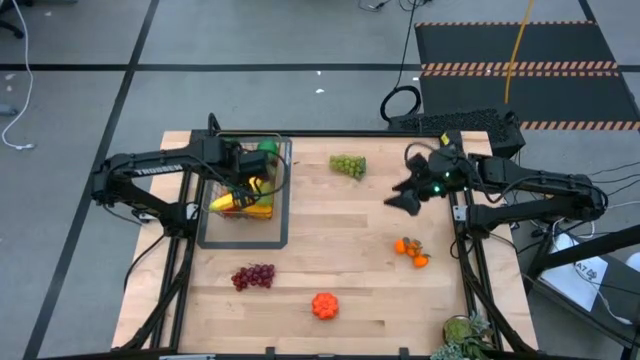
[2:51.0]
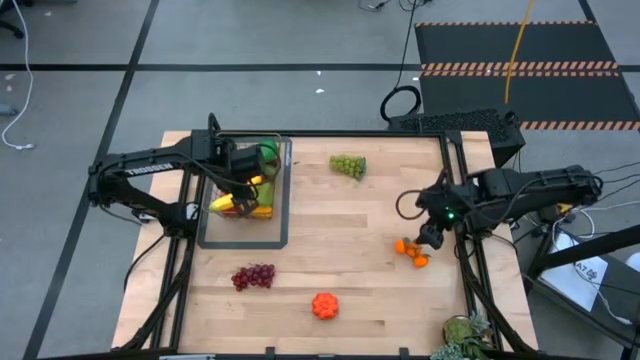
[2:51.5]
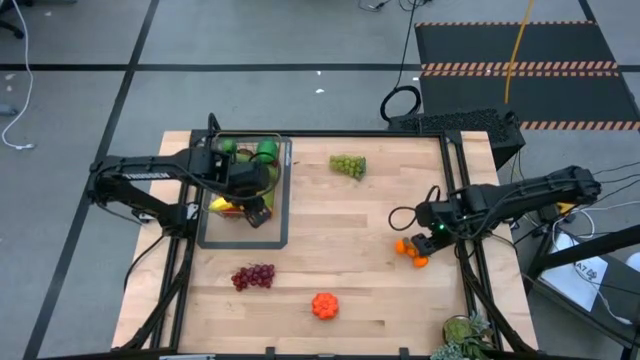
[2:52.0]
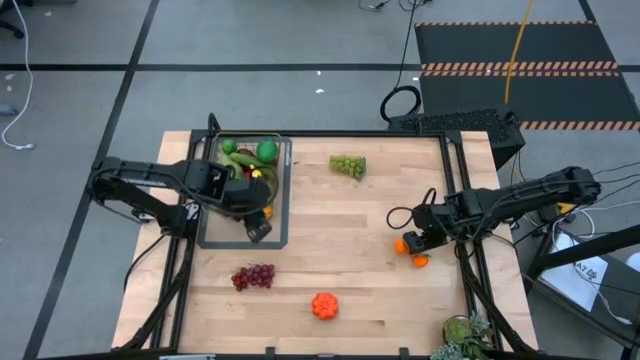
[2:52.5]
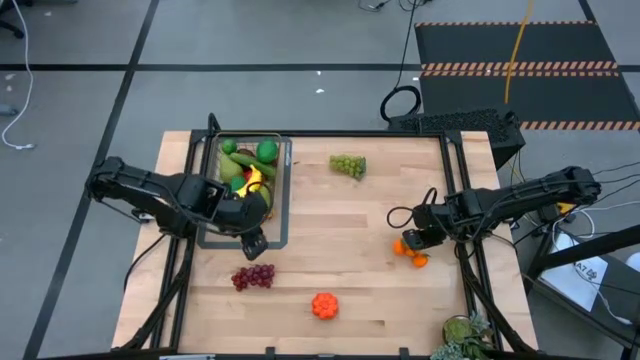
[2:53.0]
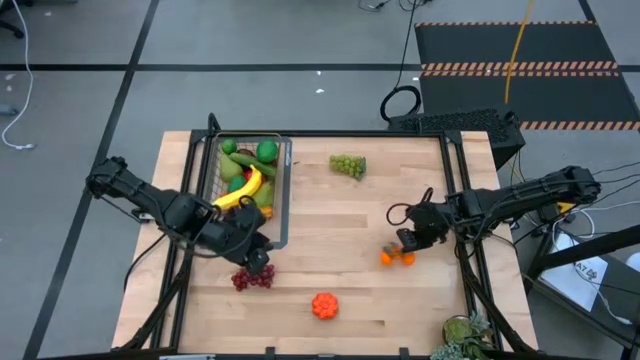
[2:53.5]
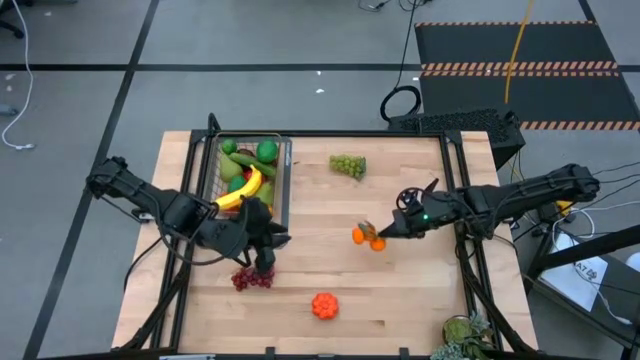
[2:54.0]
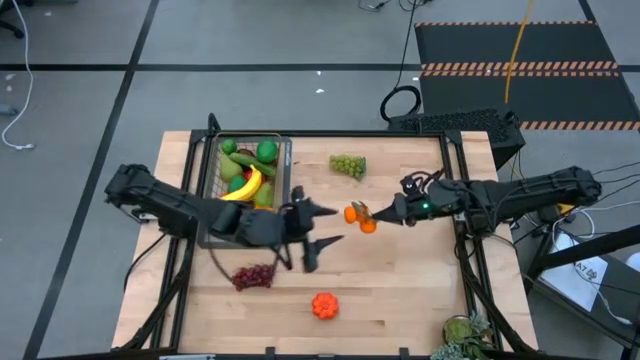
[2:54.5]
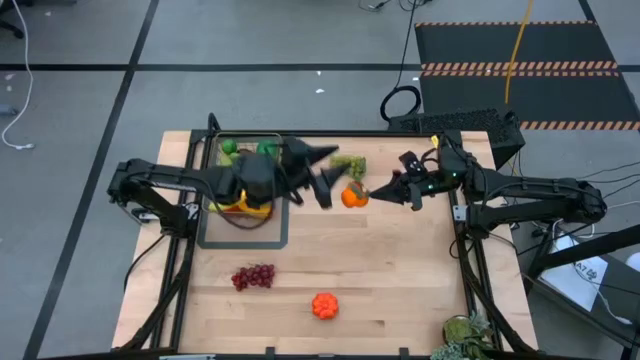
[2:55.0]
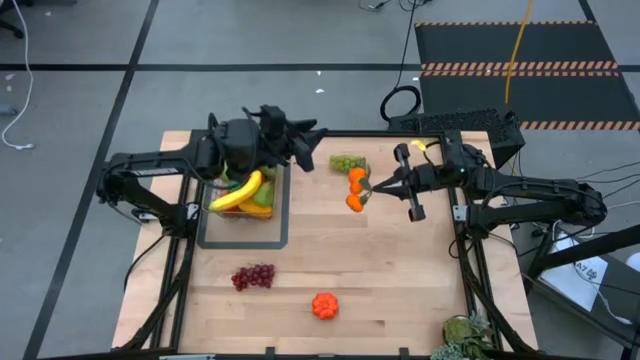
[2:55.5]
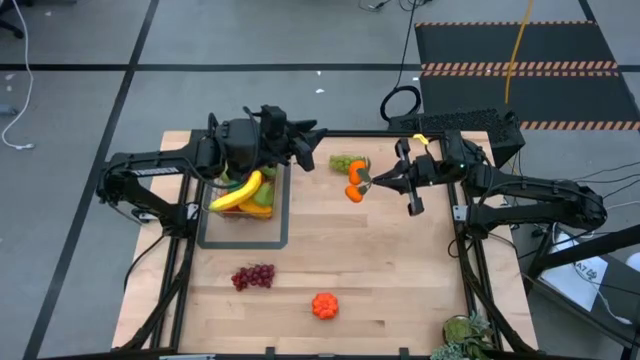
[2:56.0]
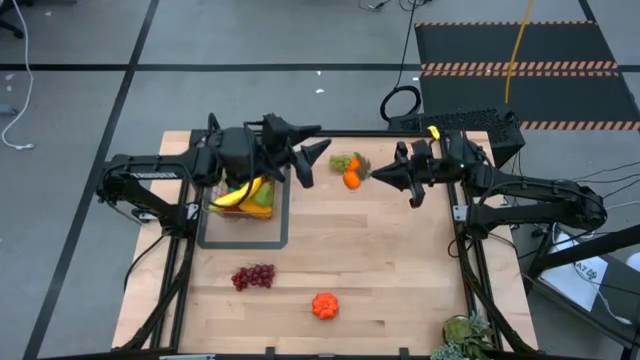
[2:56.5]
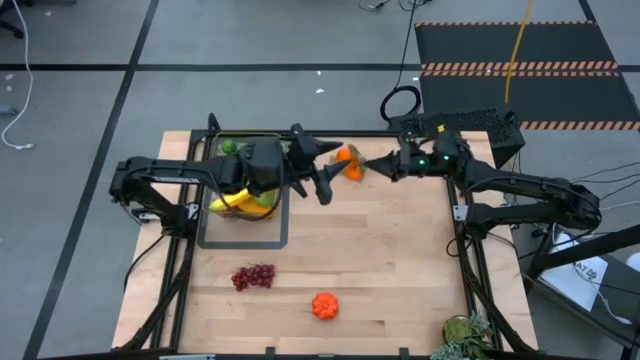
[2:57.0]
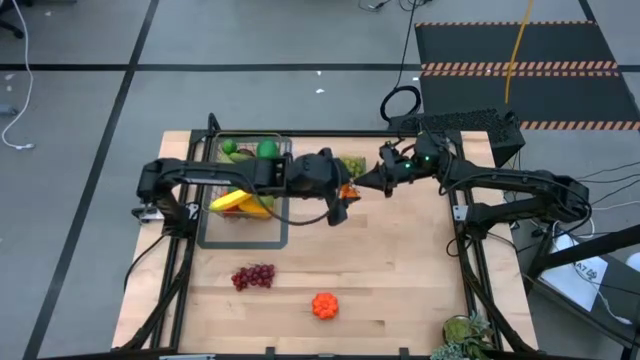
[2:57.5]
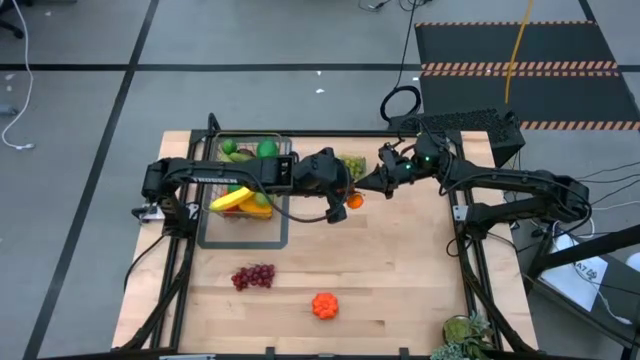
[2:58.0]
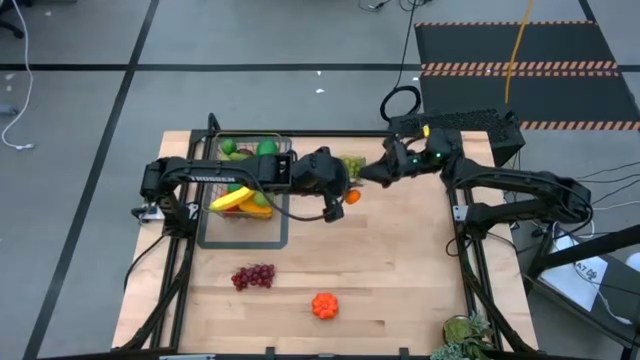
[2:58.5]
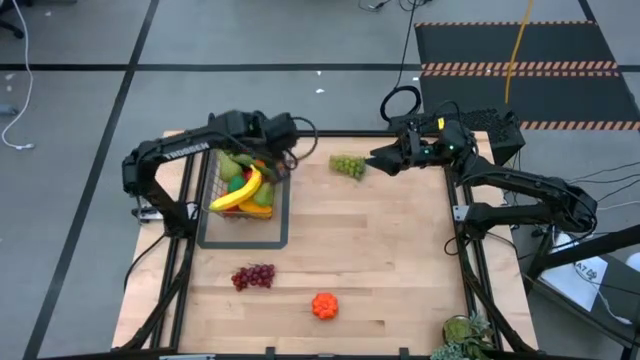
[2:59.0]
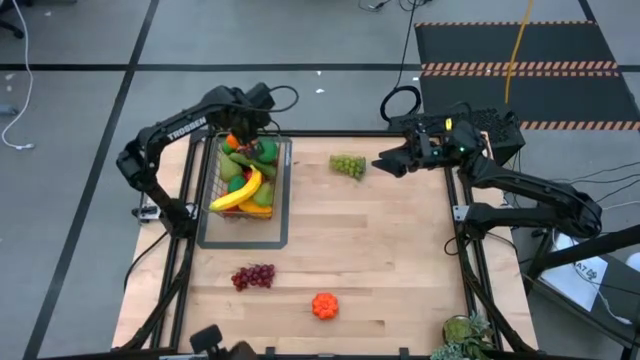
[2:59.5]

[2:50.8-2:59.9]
Task: Build produce basket
Put the tangerine into the wire basket

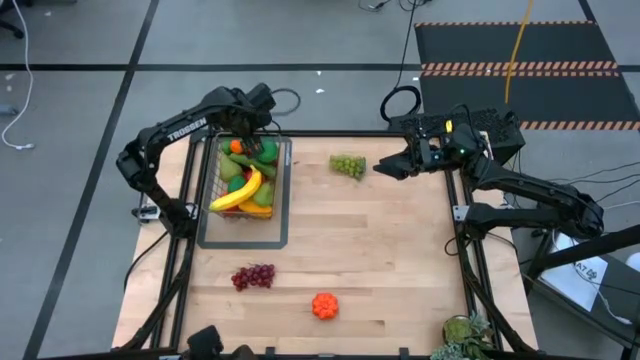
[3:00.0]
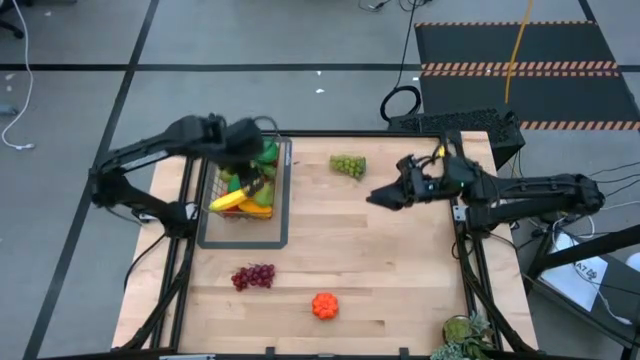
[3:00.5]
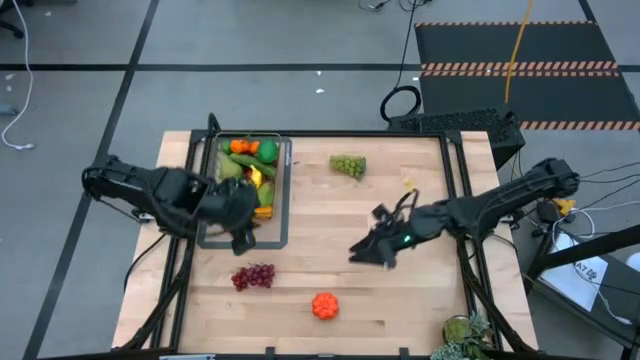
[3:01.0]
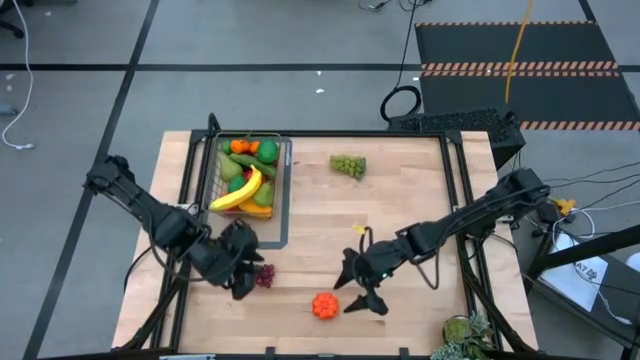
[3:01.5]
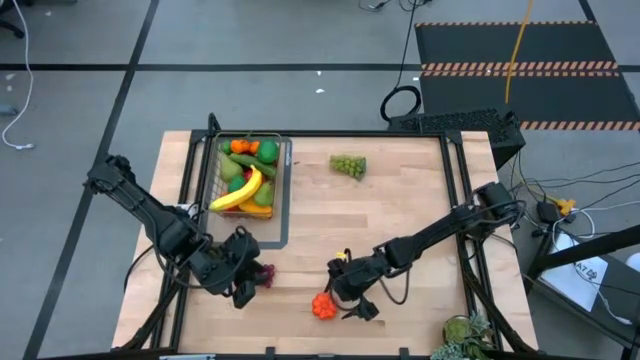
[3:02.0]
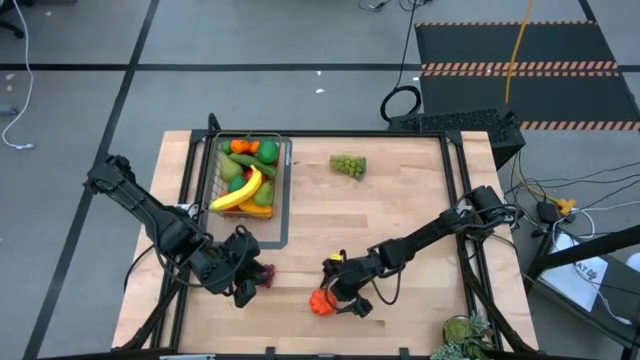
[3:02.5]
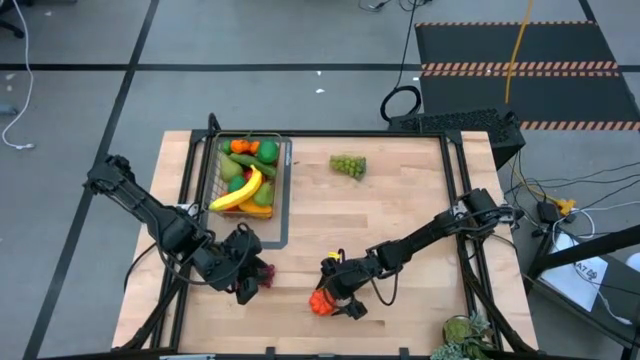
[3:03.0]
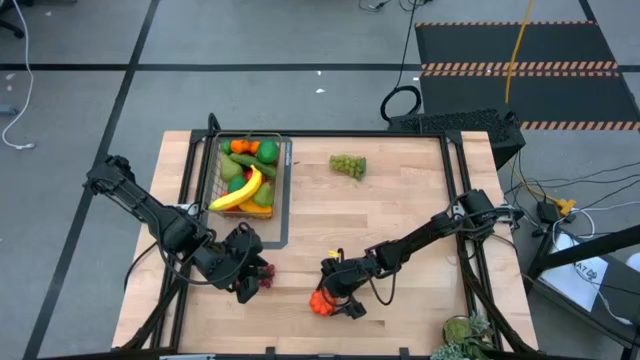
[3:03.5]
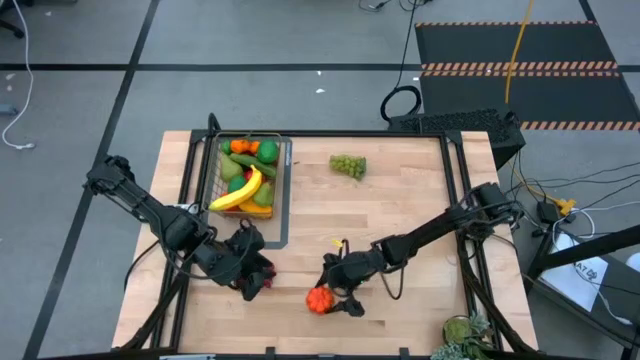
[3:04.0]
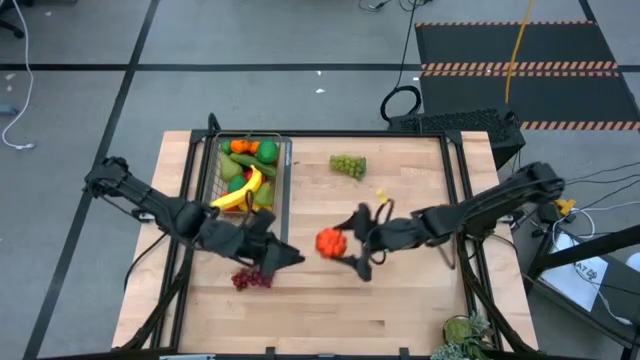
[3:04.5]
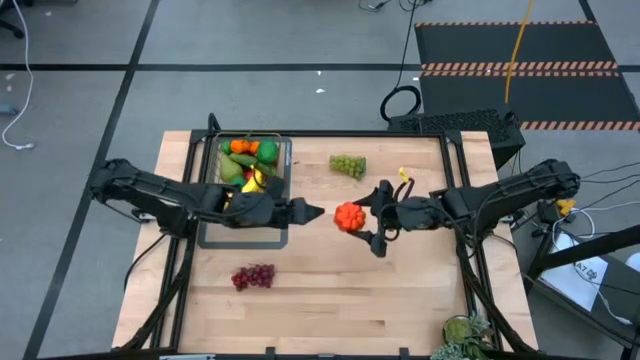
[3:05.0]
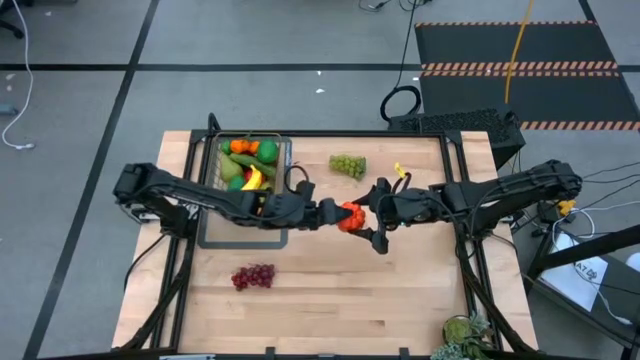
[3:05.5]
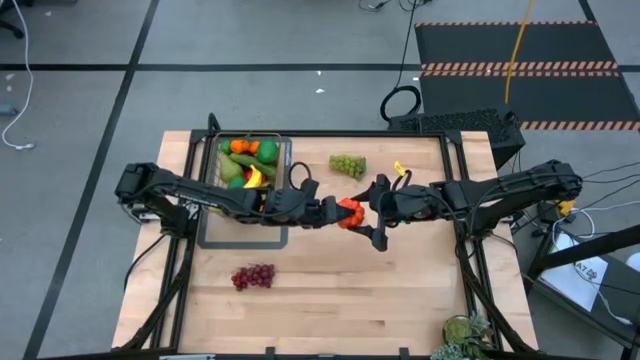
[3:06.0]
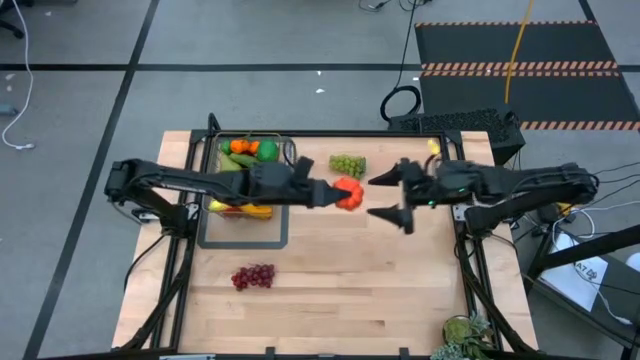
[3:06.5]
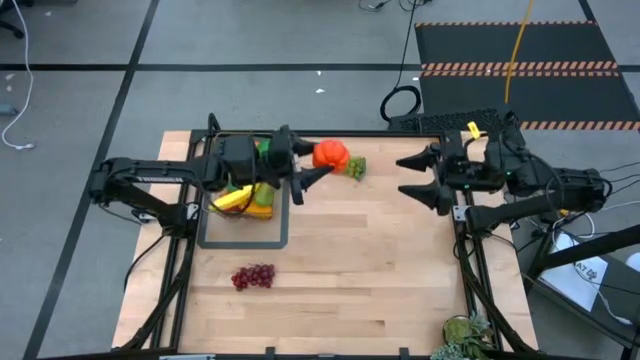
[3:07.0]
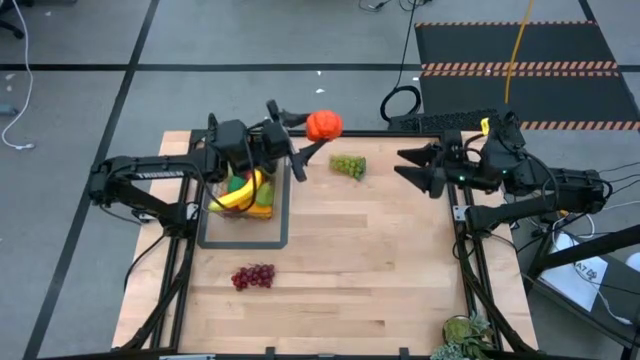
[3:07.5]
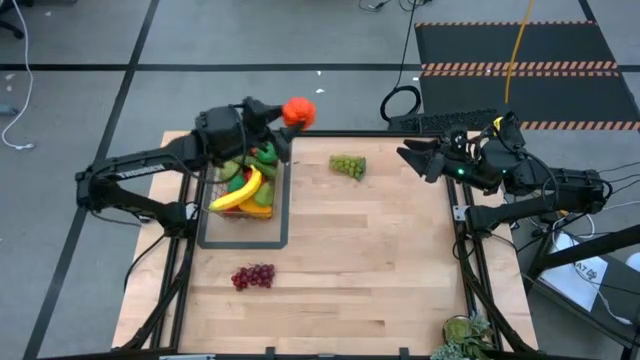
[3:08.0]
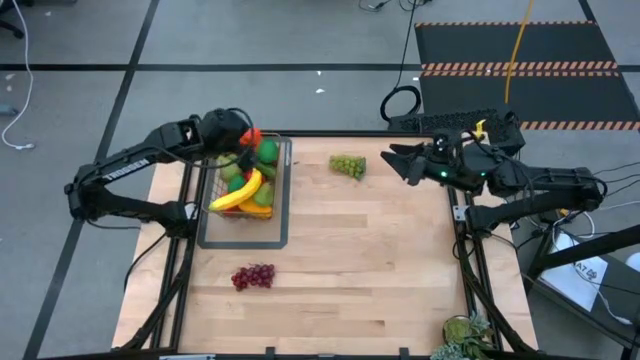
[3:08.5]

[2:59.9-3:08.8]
Put the pumpkin into the wire basket

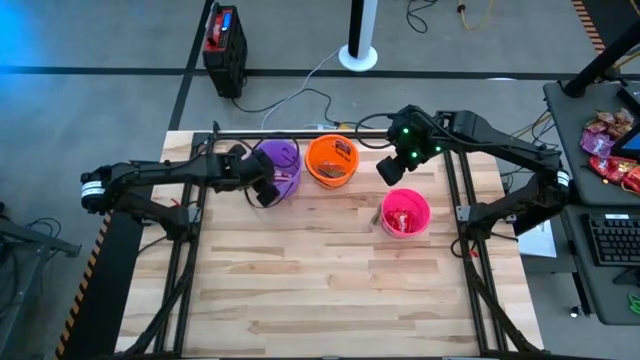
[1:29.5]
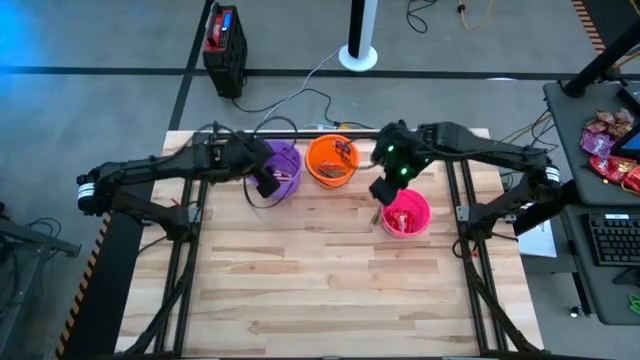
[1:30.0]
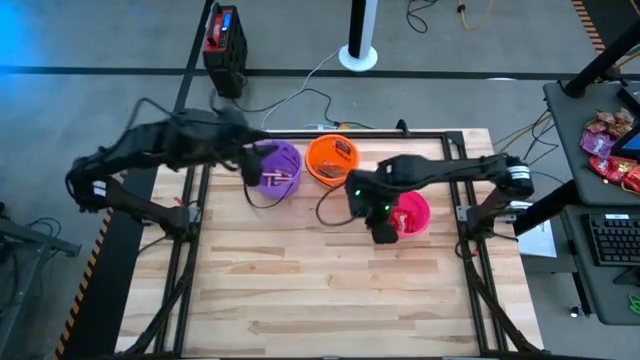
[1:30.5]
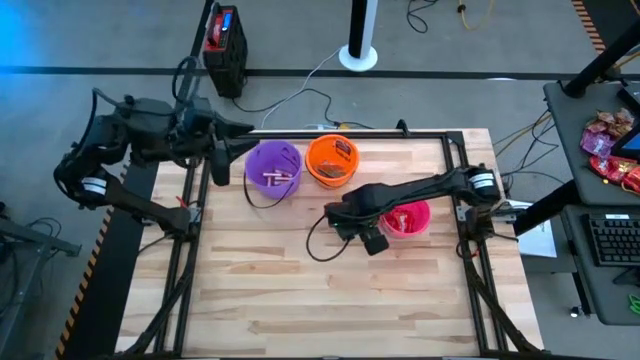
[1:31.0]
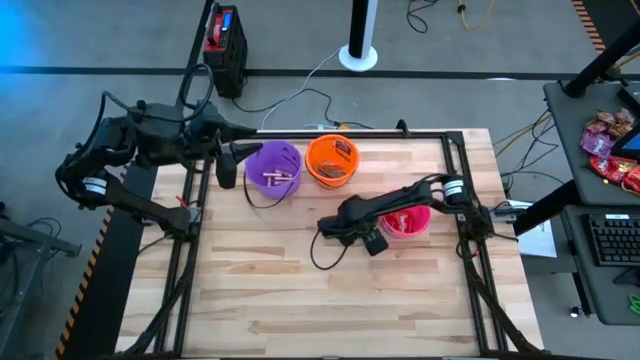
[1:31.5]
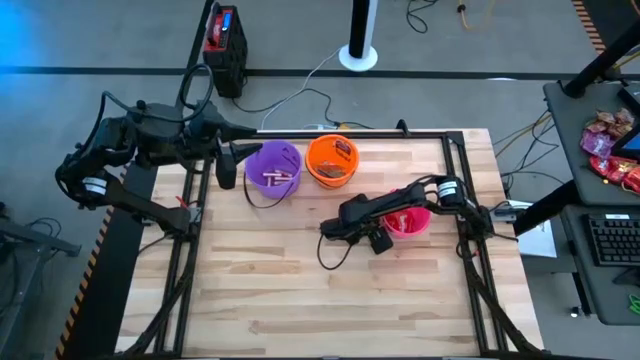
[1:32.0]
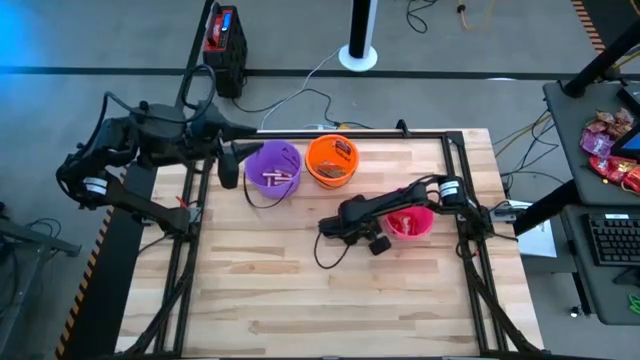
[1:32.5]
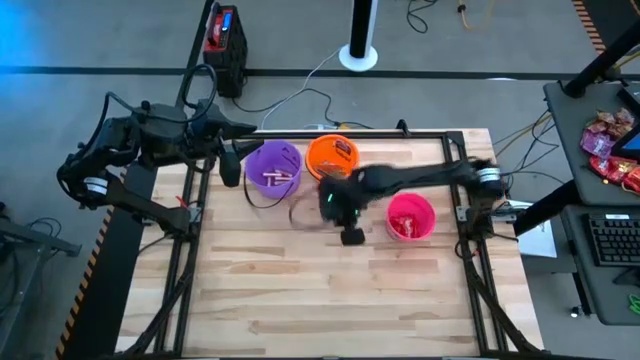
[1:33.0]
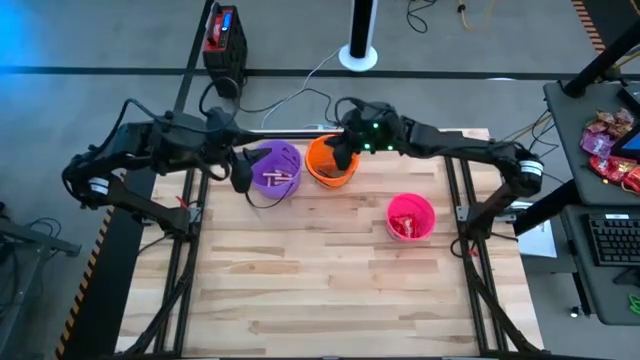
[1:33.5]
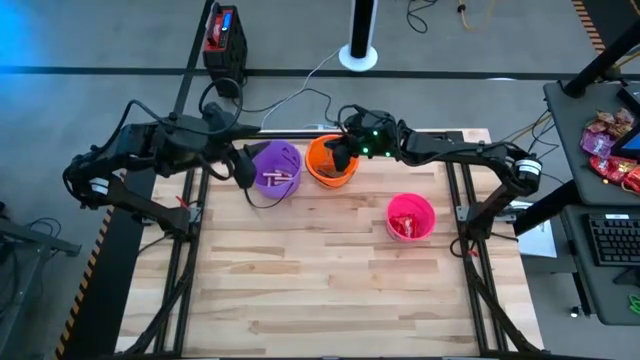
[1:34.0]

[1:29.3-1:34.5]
Task: Sort candy by brand, put in halloween buckets
Put the green candy into the orange bucket
